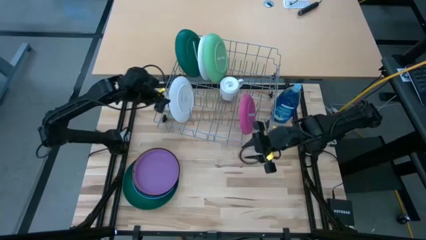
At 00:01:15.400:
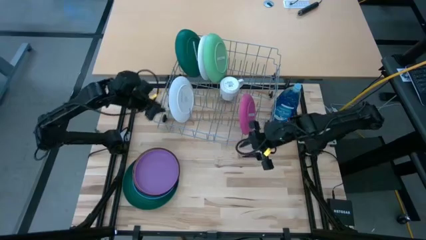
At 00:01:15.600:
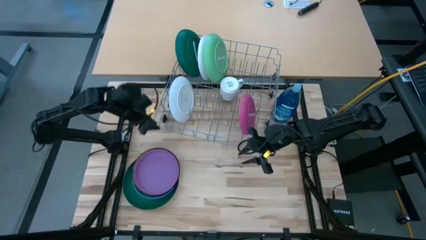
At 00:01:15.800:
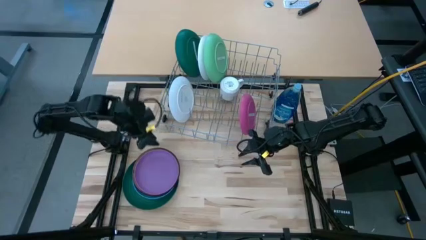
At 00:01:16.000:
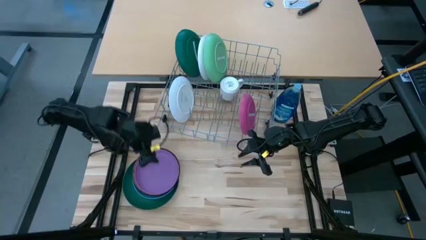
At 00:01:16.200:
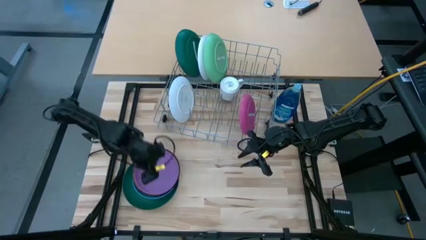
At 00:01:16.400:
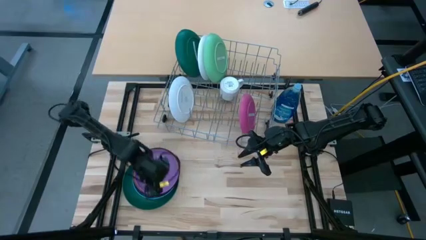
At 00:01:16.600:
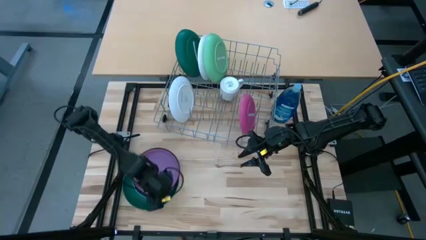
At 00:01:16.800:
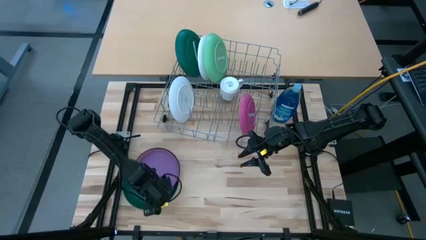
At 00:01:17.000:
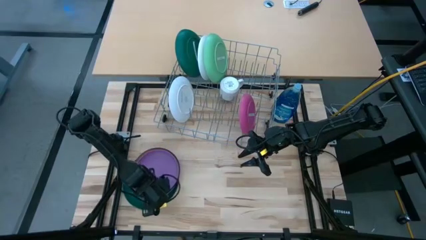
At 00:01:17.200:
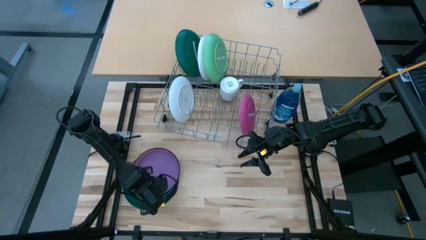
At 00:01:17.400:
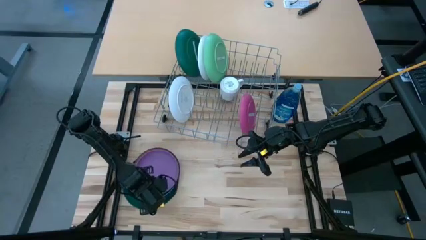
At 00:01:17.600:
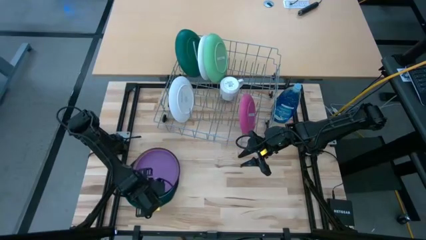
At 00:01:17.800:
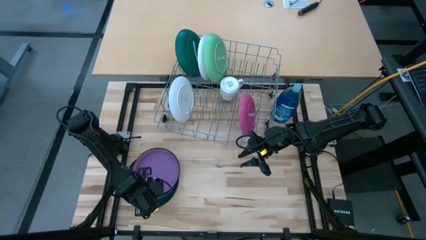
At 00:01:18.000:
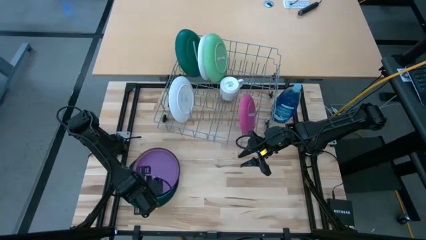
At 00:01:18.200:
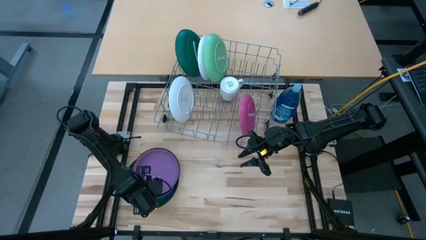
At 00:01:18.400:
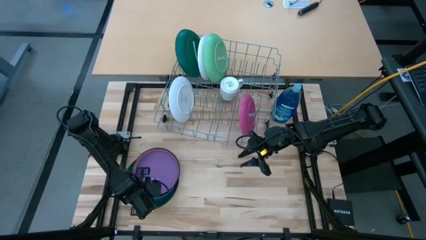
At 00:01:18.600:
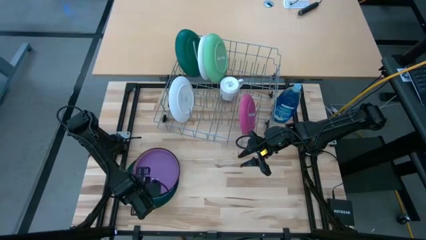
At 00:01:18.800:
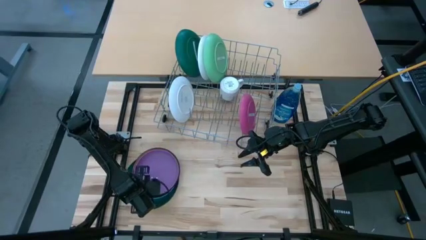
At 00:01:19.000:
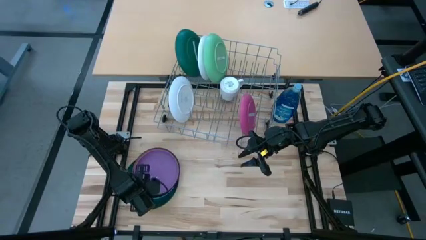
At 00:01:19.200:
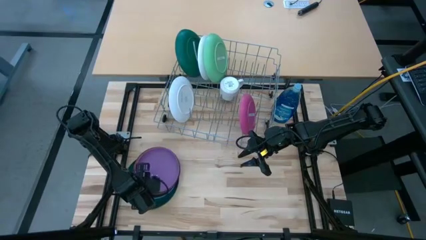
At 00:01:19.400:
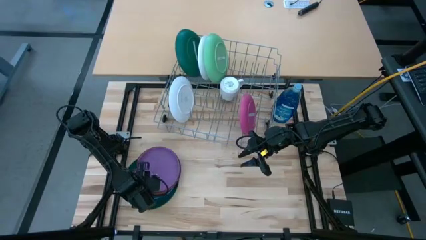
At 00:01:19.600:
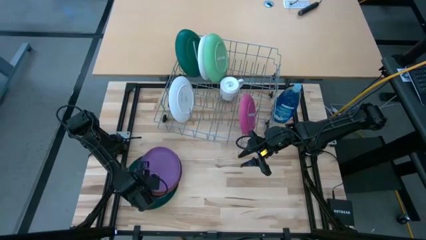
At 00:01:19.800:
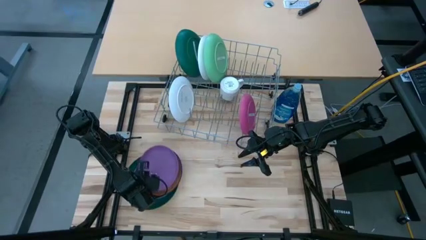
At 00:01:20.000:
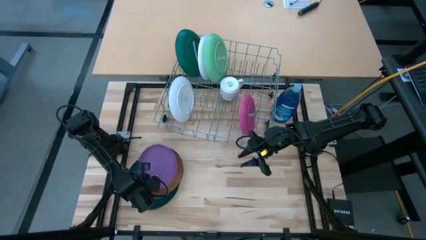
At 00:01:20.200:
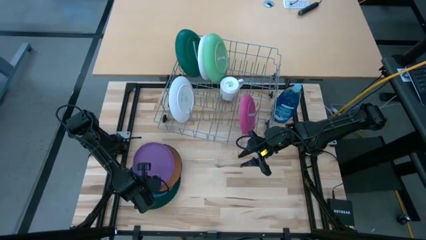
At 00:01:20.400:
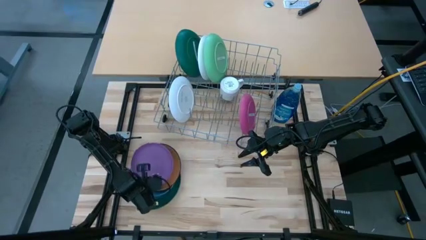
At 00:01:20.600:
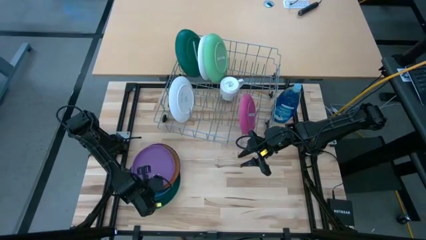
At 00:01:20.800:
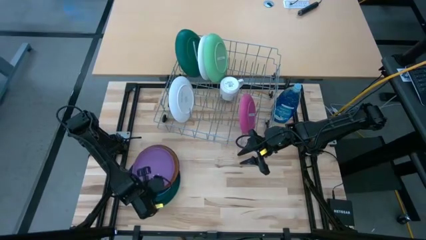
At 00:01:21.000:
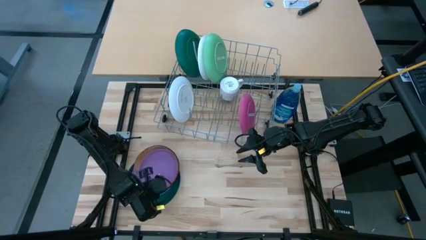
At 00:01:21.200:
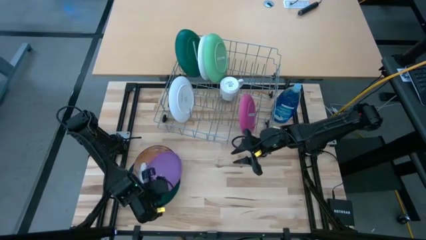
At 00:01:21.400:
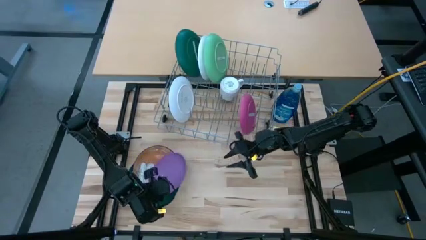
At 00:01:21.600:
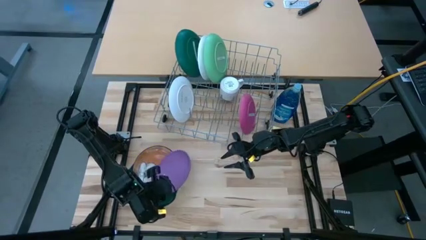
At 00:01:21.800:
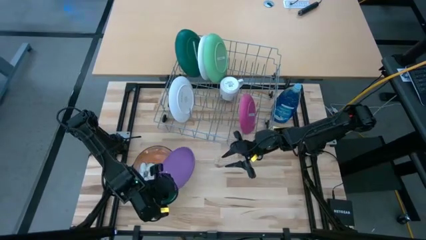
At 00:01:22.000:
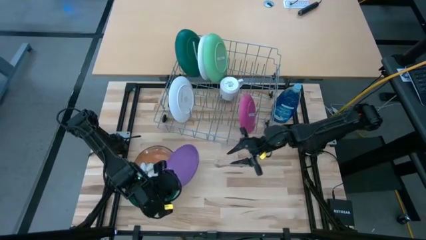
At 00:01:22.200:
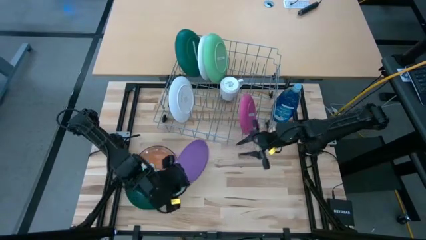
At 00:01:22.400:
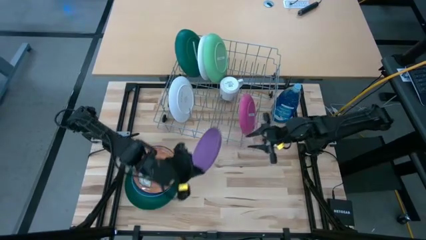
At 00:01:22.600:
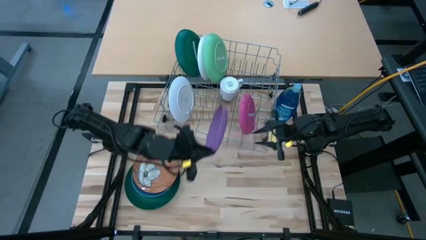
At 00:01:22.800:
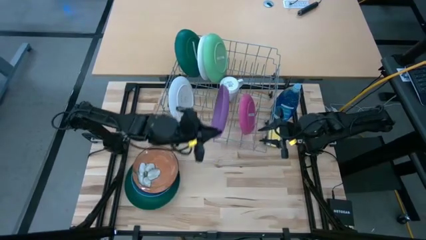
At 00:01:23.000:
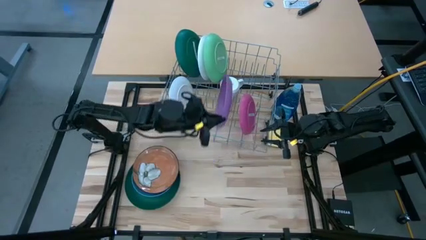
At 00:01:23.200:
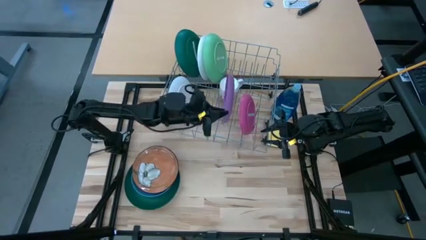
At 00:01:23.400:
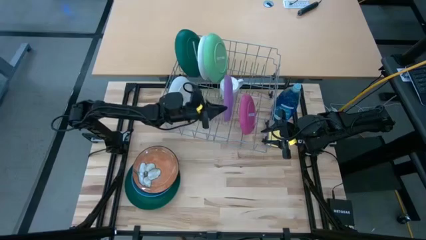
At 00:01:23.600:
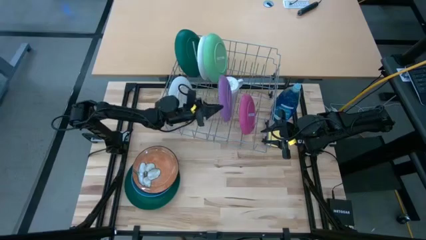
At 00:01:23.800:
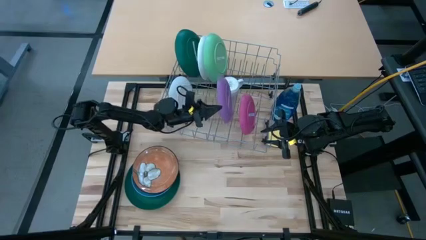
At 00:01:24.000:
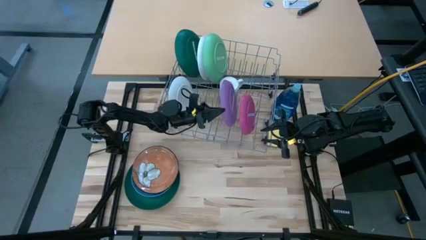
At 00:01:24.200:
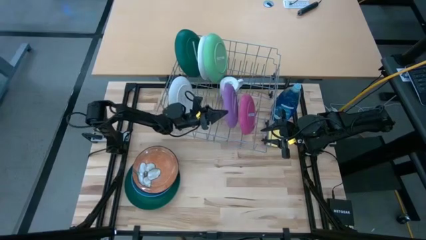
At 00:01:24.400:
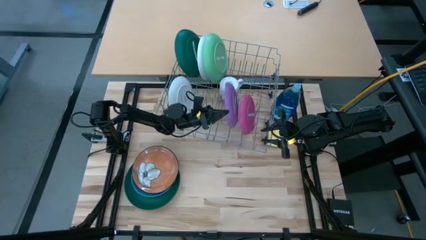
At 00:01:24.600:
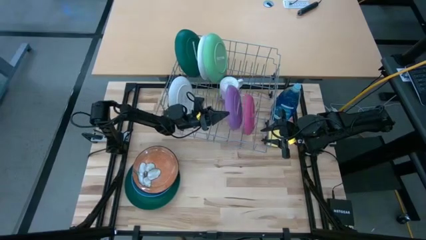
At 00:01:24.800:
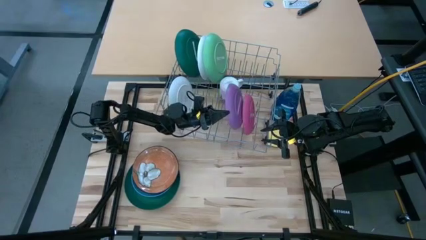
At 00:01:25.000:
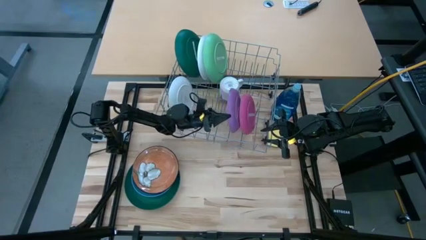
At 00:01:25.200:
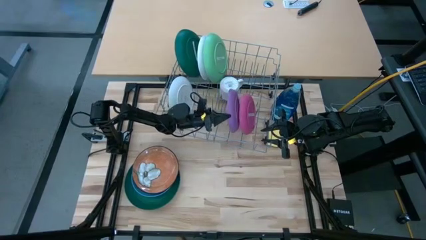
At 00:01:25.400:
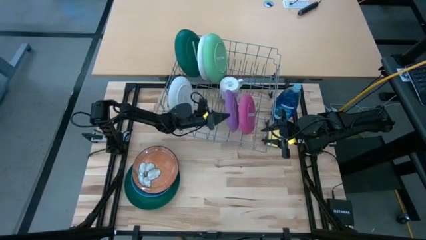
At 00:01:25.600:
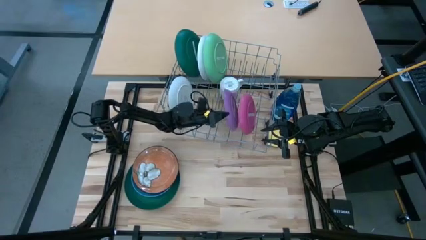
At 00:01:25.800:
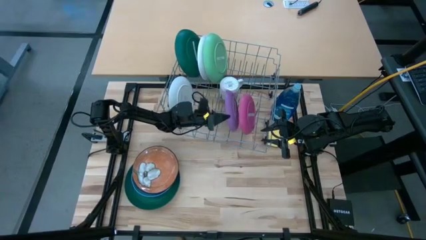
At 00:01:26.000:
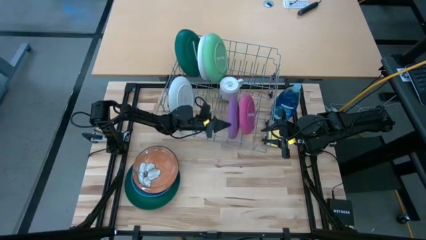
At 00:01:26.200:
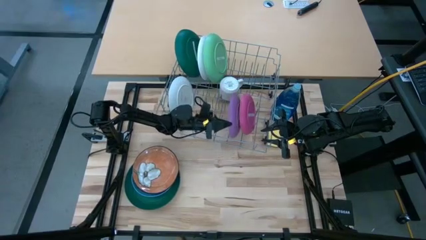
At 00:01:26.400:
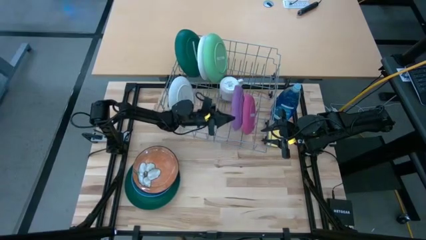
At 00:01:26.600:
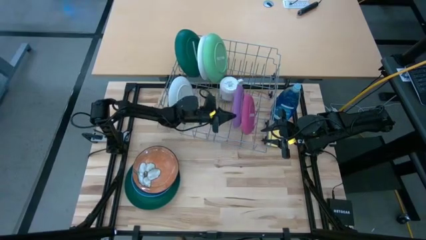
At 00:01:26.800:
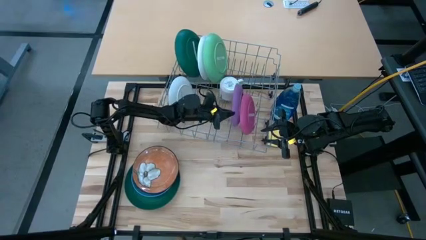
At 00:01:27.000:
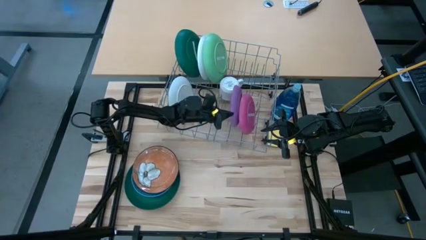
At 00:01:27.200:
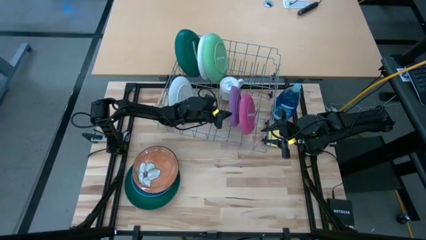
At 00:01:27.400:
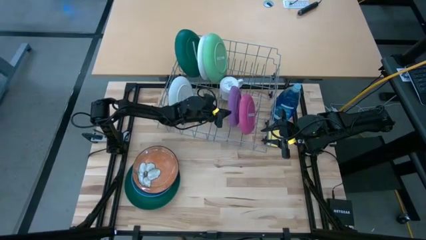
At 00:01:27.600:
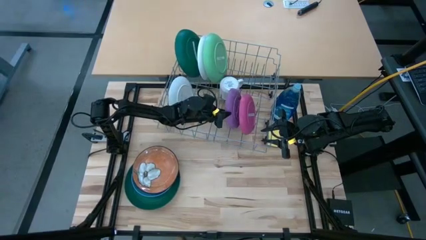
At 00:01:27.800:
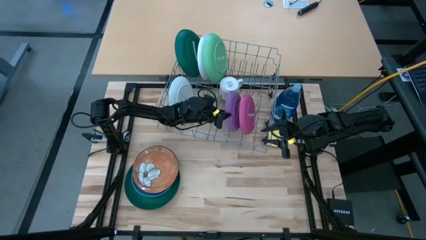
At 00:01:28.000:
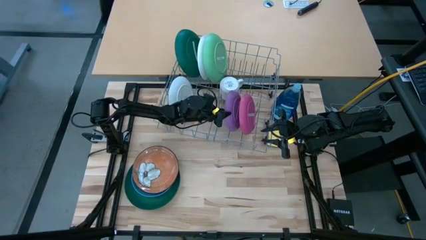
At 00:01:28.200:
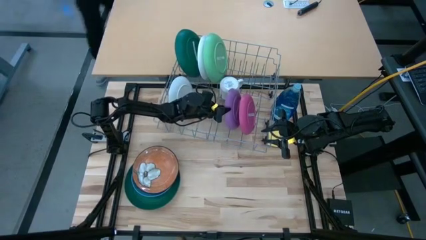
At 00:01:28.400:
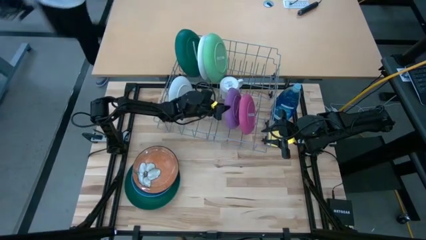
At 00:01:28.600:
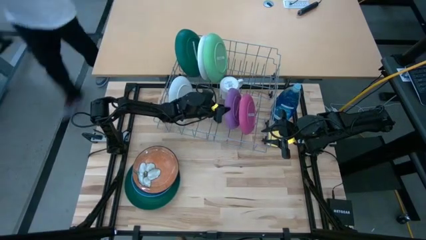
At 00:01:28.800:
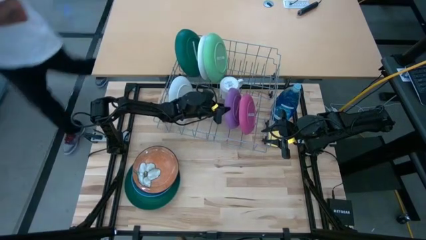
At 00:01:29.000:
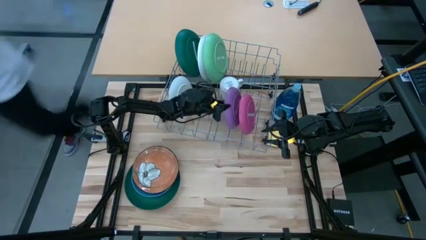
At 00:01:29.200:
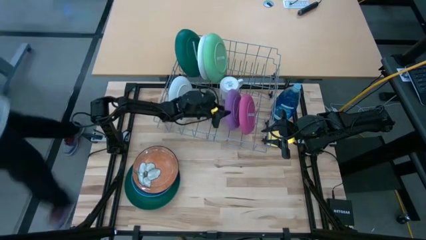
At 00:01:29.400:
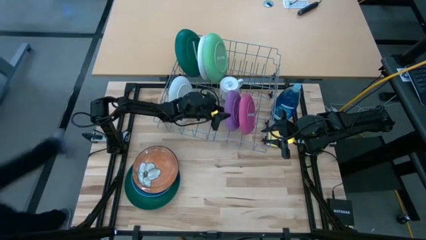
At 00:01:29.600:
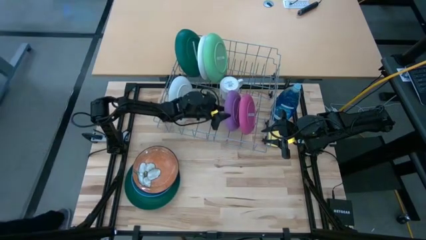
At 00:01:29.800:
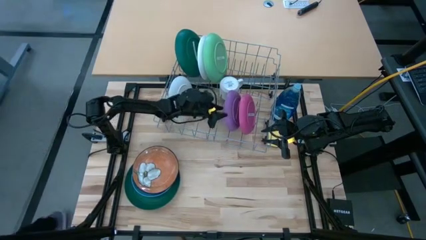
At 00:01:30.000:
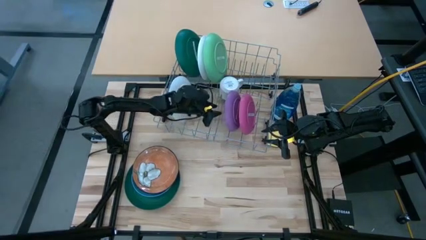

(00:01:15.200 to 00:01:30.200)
Task: Sort dishes
Put the violet plate in the dish rack
